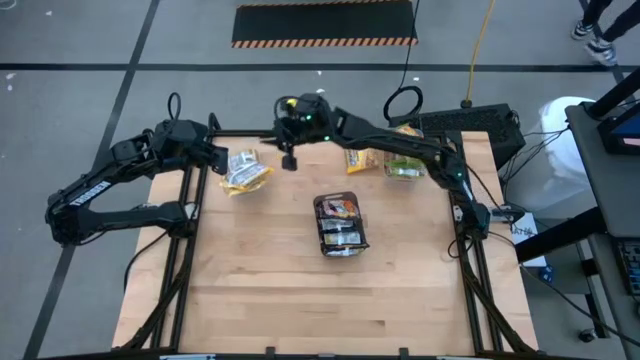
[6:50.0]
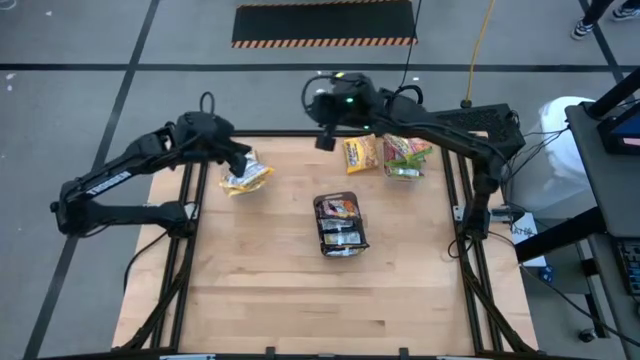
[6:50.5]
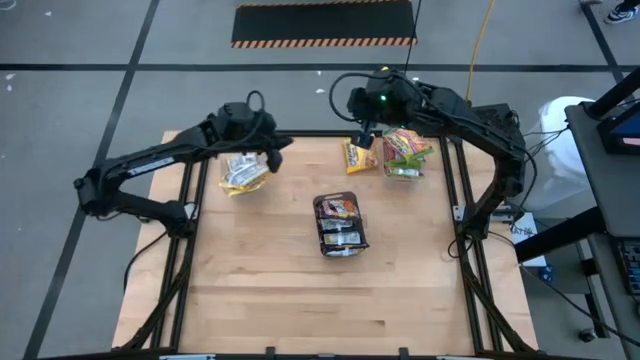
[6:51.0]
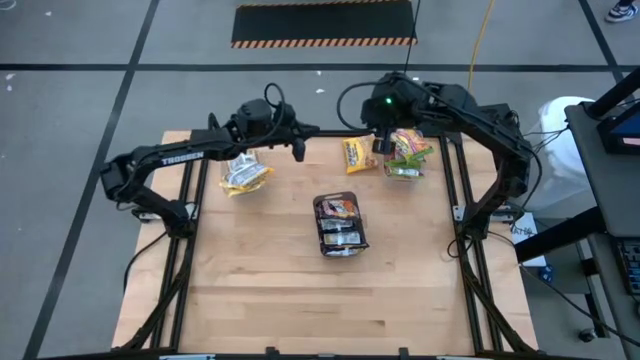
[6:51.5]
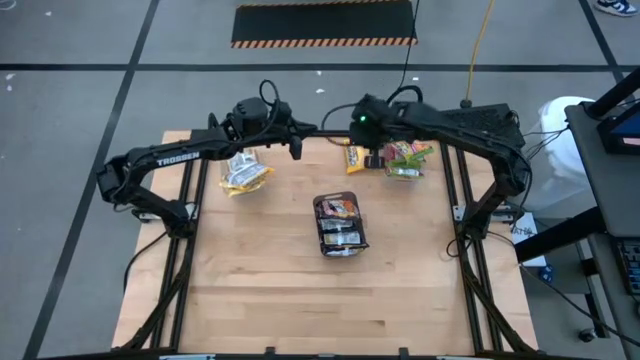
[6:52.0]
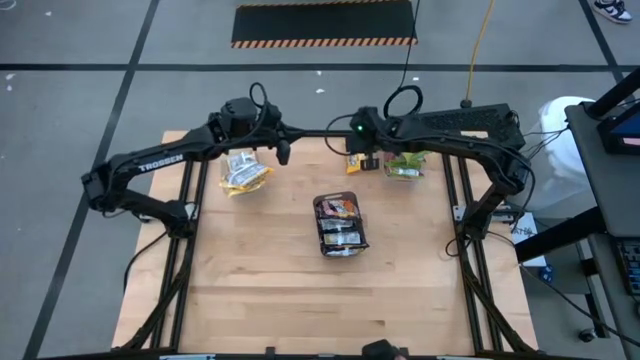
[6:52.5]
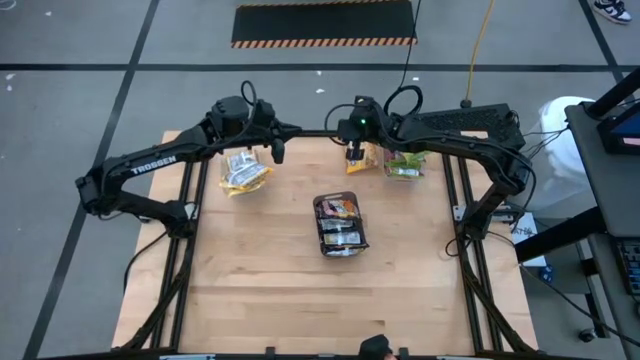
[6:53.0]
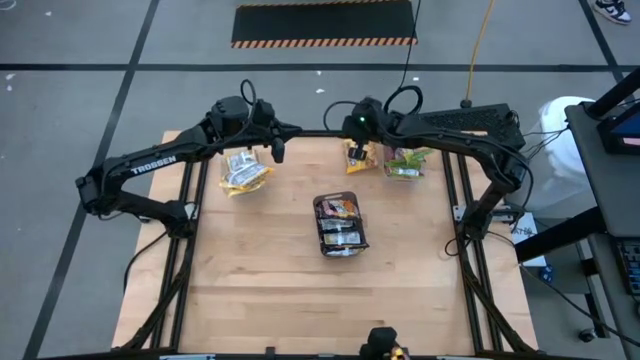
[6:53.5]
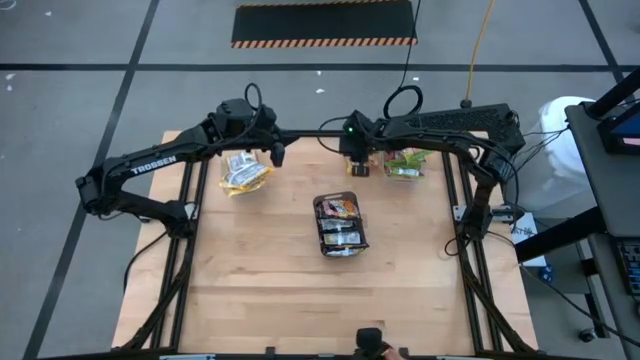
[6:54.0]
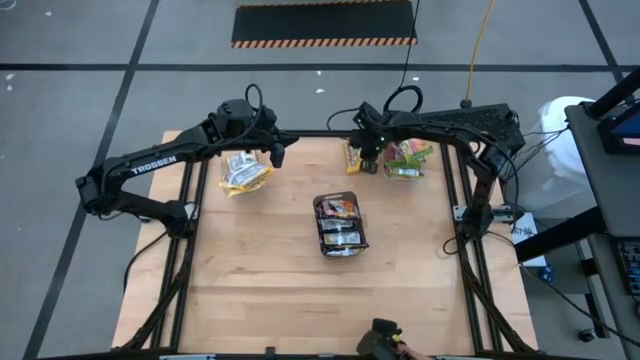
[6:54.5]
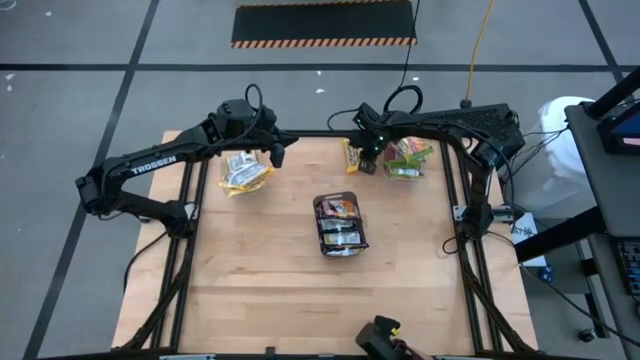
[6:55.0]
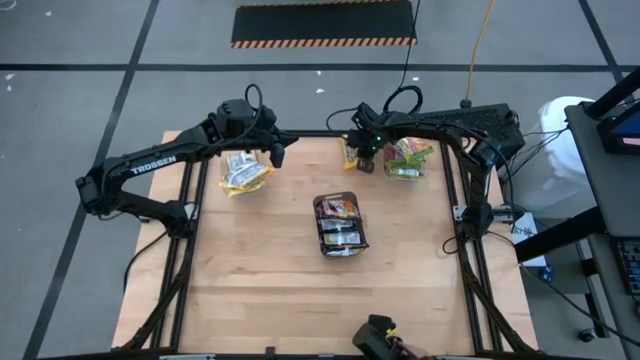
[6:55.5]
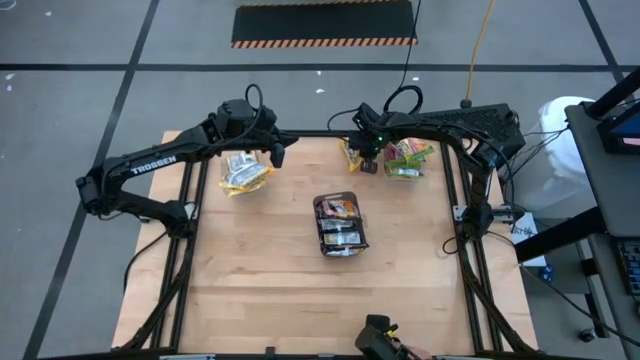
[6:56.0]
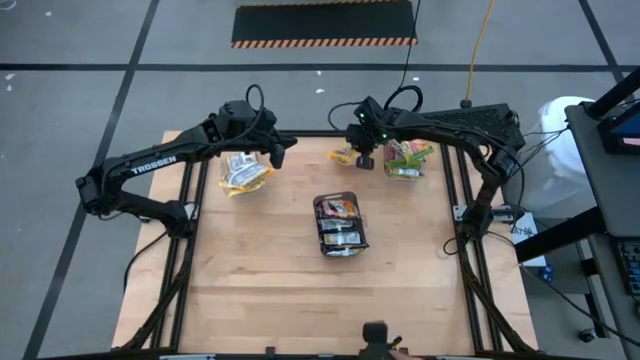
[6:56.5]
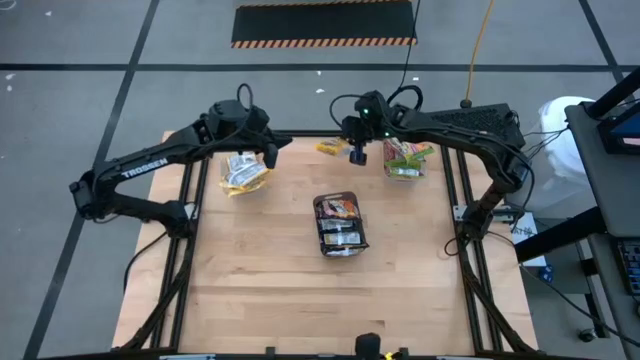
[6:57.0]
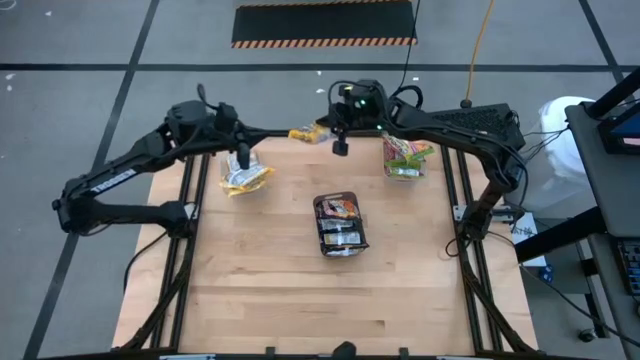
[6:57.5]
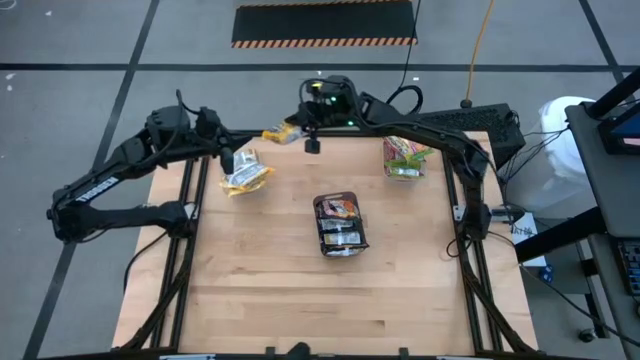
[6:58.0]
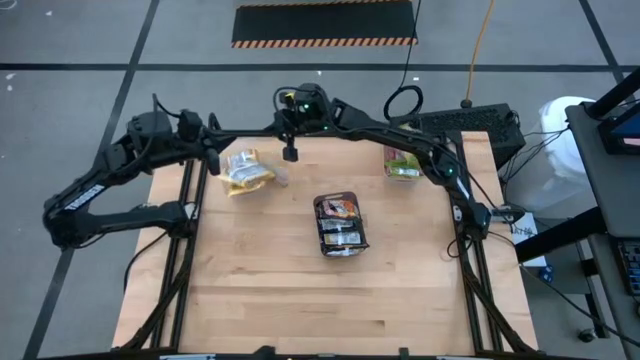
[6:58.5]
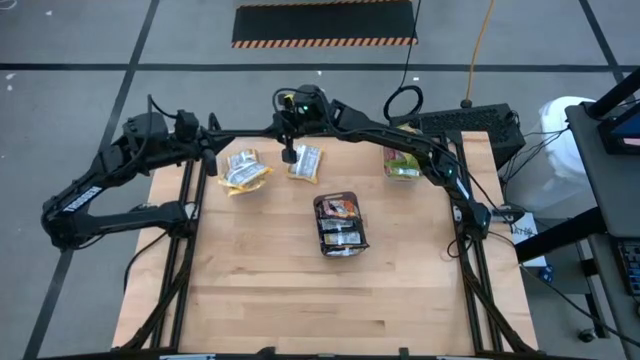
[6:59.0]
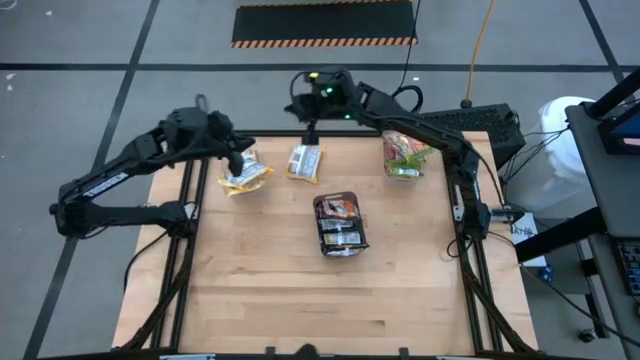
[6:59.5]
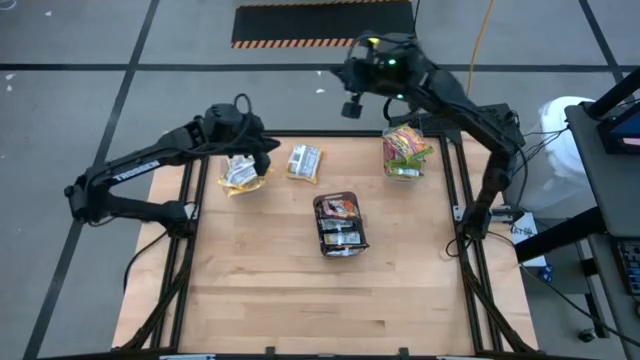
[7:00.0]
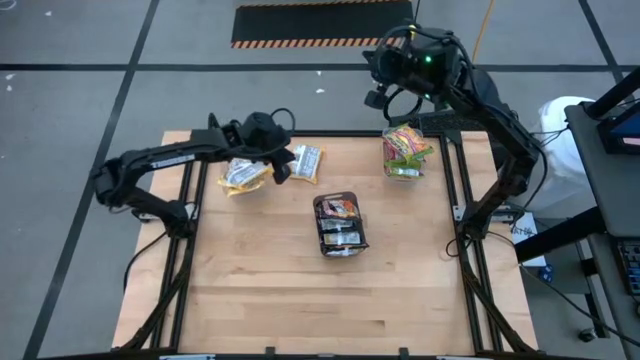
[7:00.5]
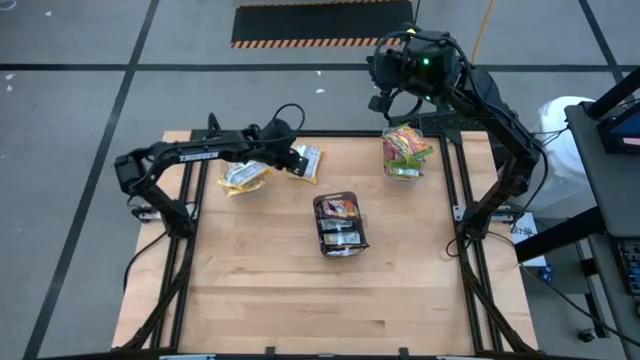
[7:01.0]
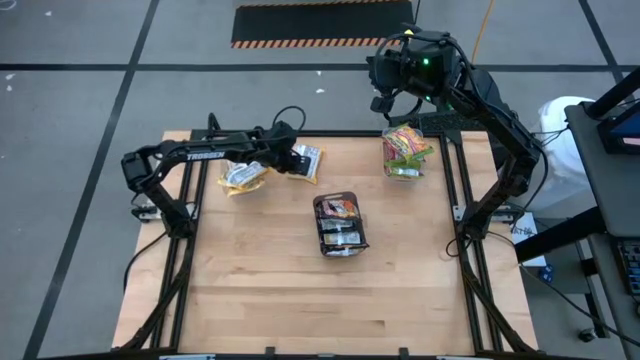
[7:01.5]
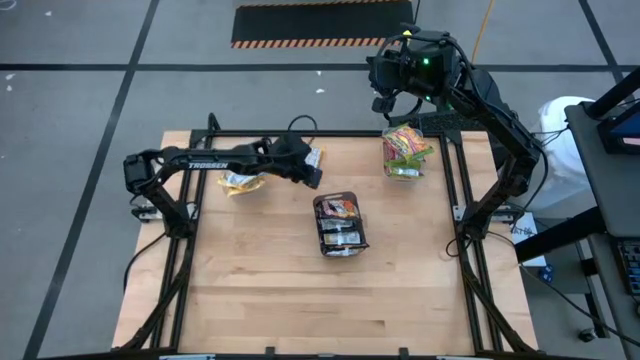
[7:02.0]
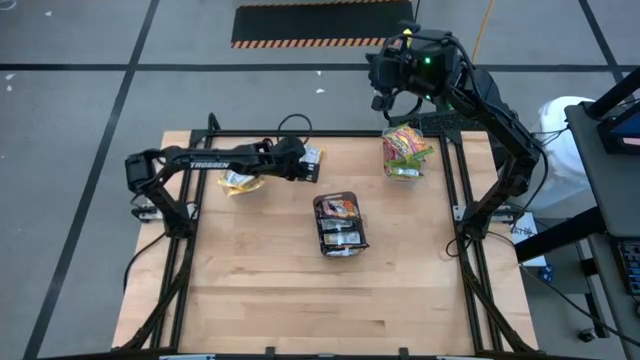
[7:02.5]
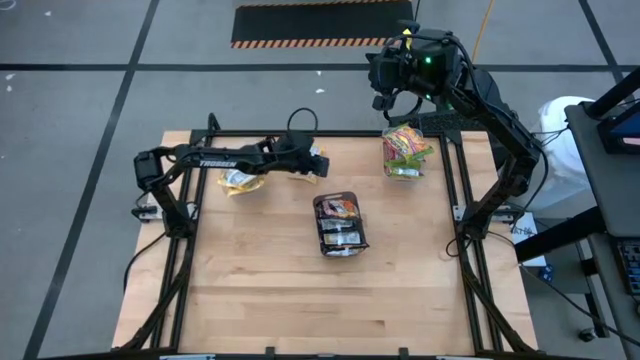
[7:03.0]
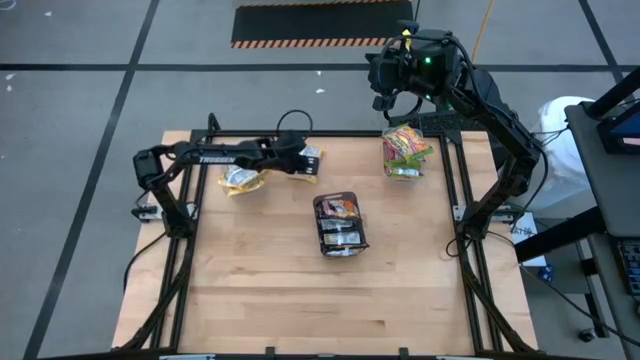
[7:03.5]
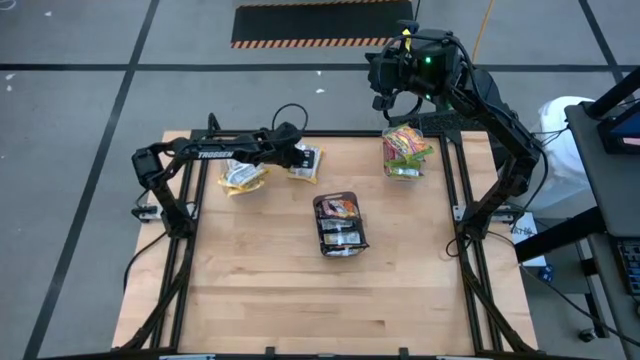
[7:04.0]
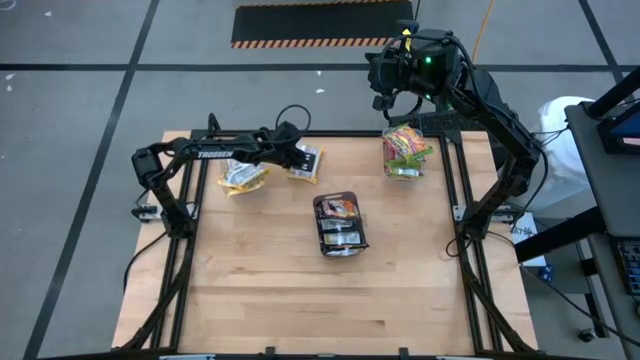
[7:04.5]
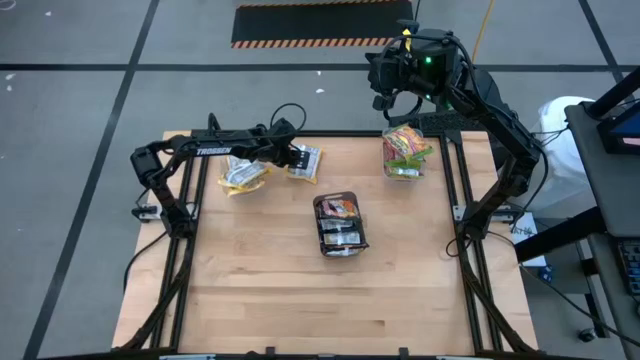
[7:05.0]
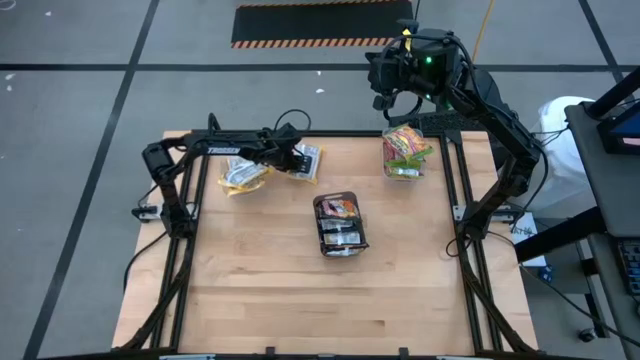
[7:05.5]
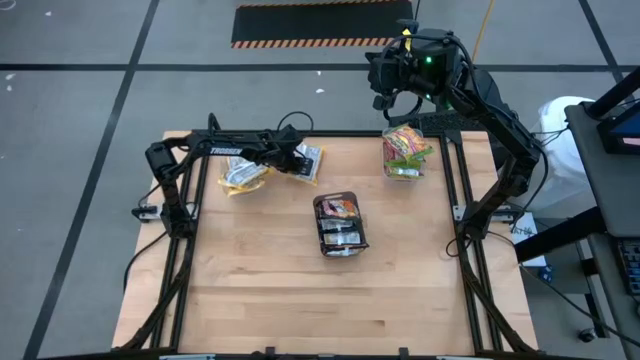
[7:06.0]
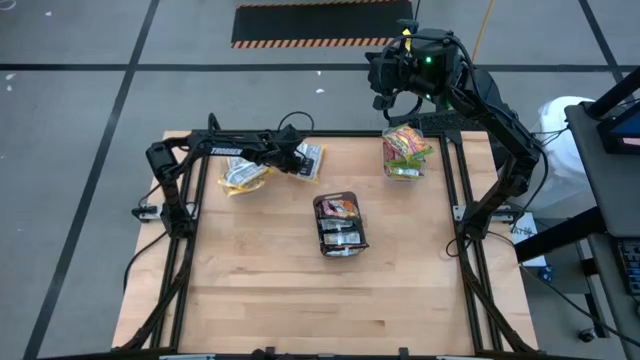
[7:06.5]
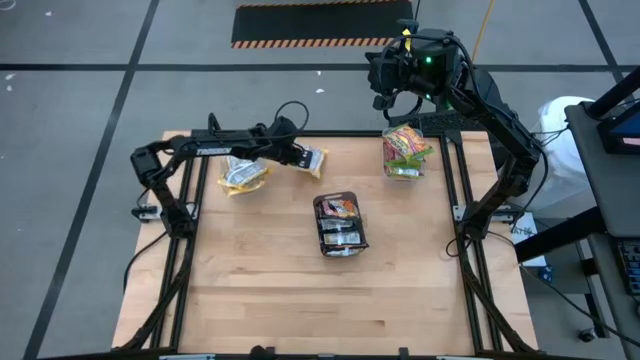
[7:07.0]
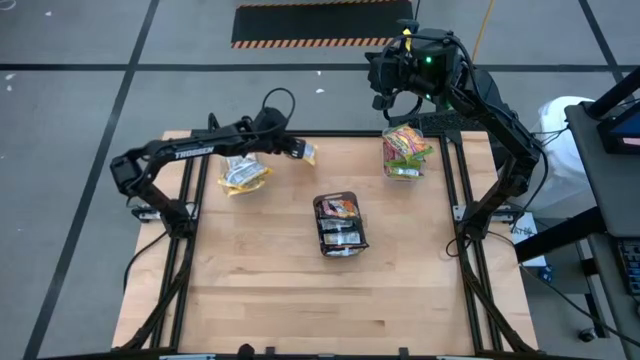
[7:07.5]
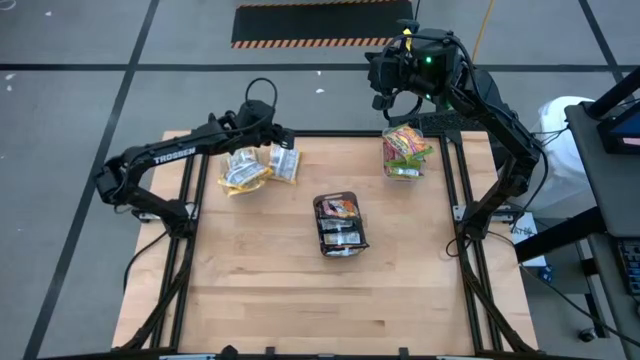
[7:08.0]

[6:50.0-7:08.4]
Task: Sort Maruchan noodles
Put the yellow noodle pack into the left transparent bin

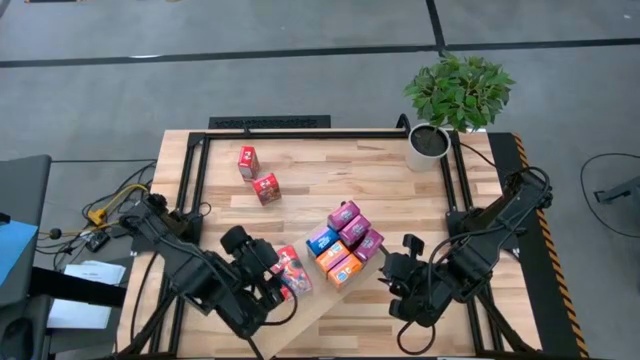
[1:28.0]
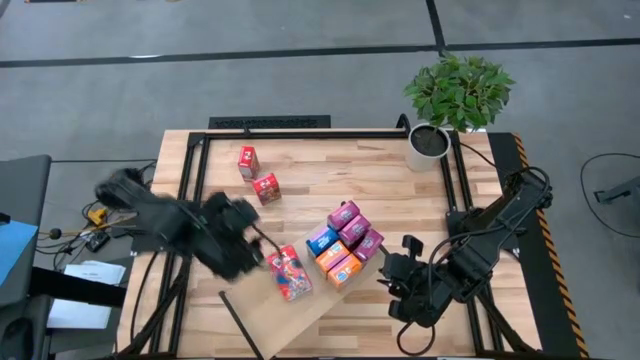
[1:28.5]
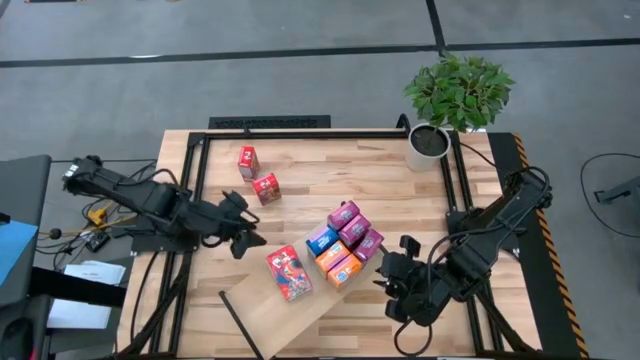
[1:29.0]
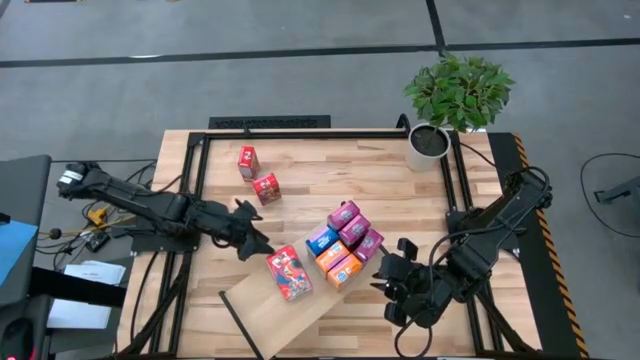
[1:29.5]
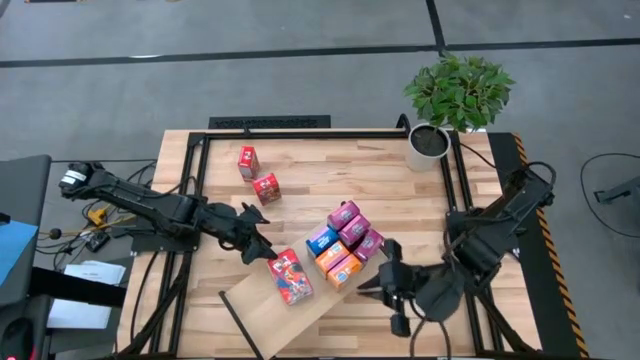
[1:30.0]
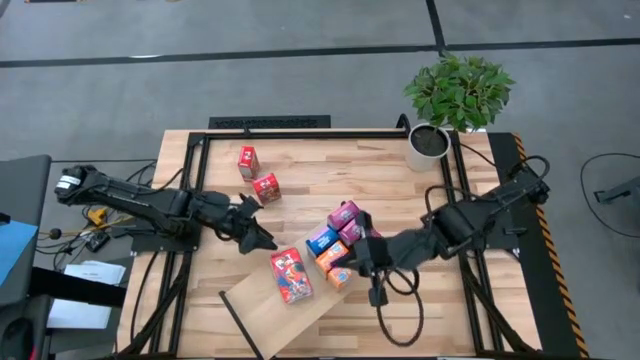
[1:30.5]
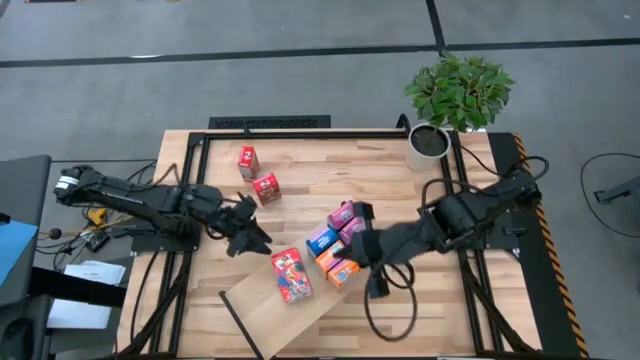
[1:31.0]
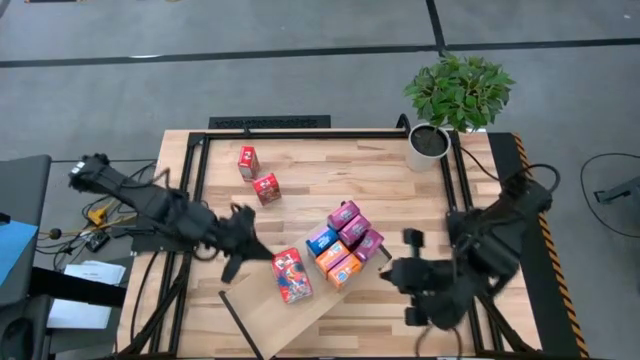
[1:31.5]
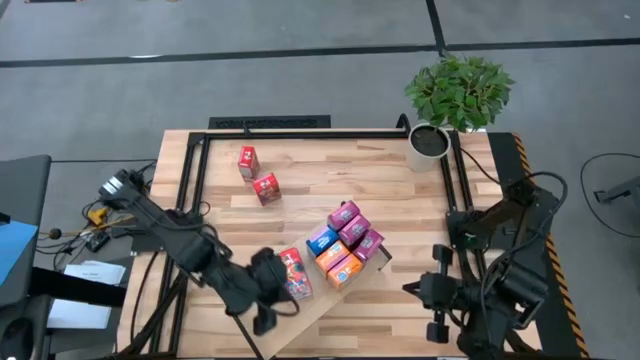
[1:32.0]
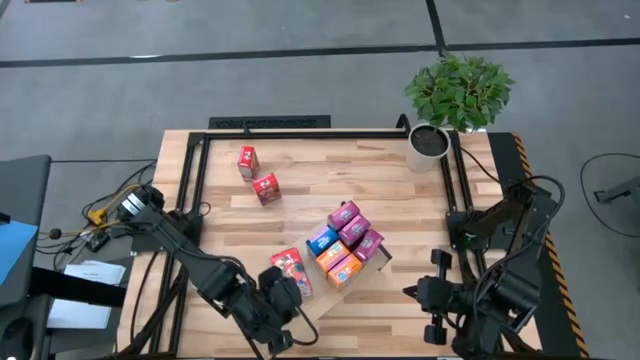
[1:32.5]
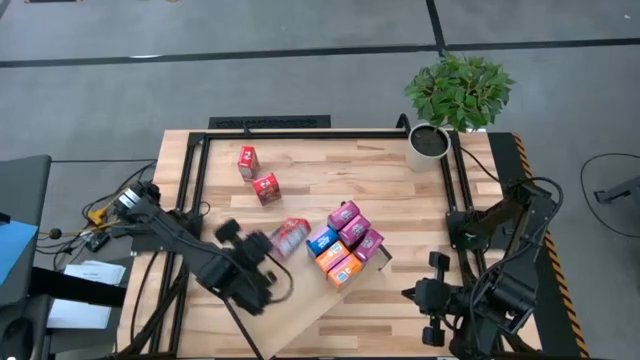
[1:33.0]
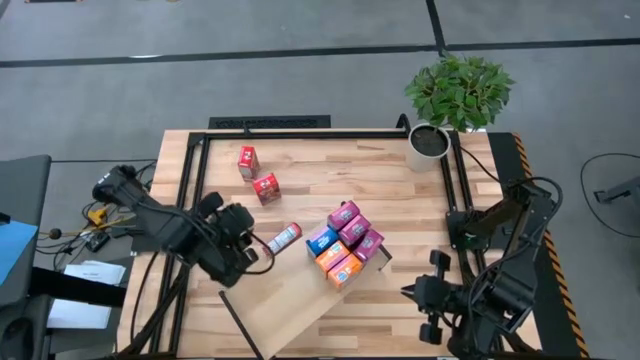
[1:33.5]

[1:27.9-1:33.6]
Task: Stack cereal on shelf
Remove the red cereal box from the shelf
